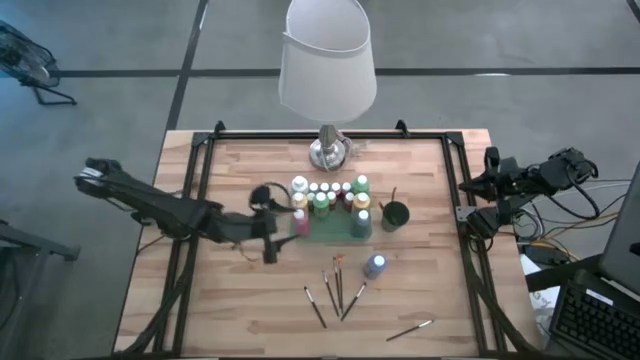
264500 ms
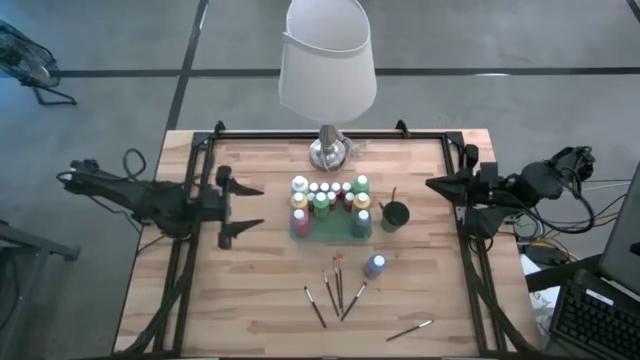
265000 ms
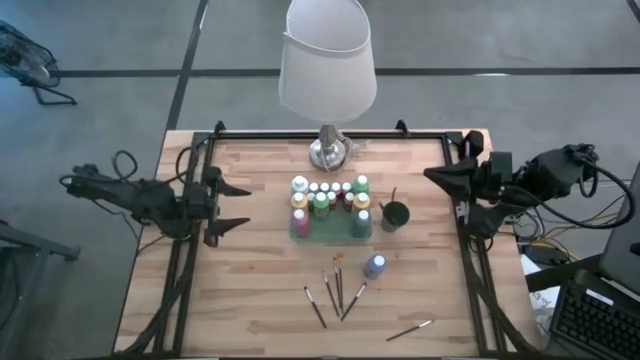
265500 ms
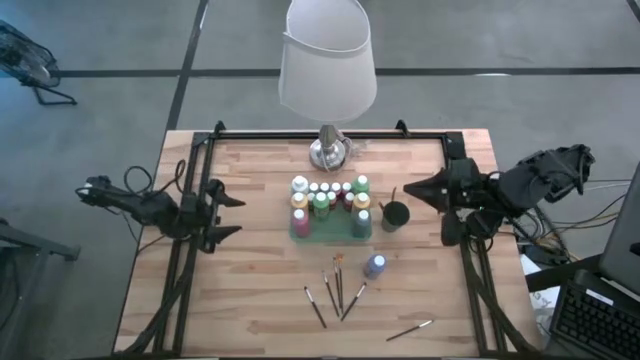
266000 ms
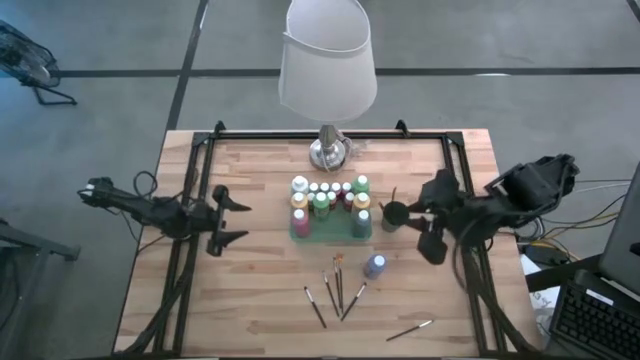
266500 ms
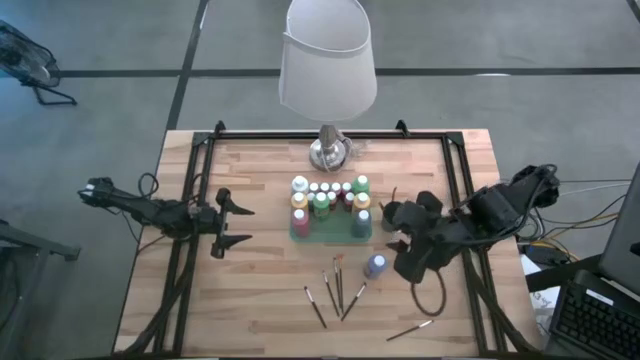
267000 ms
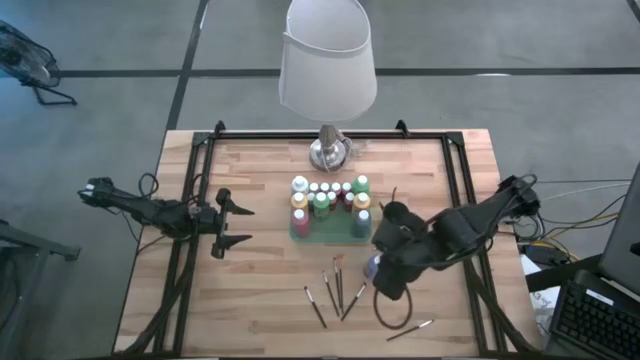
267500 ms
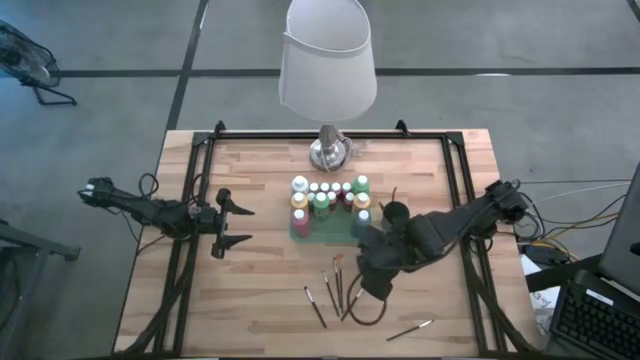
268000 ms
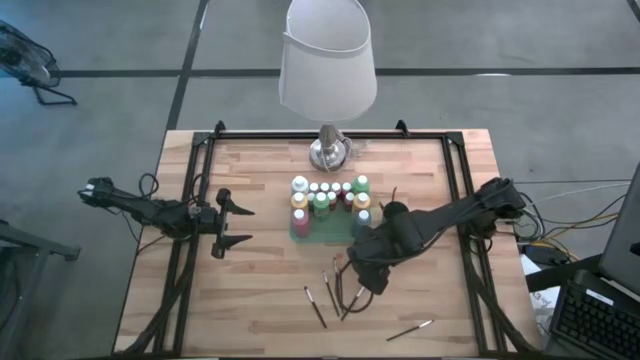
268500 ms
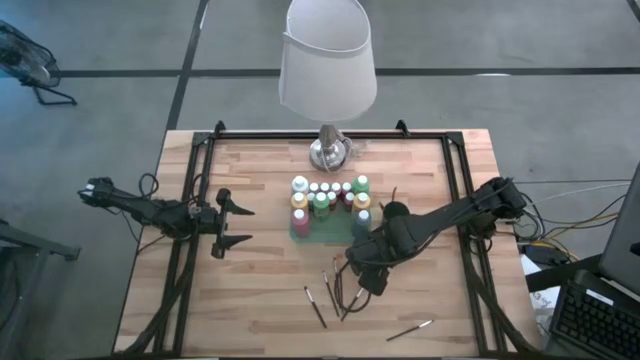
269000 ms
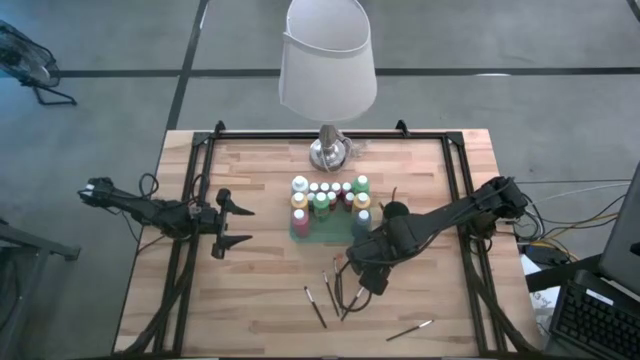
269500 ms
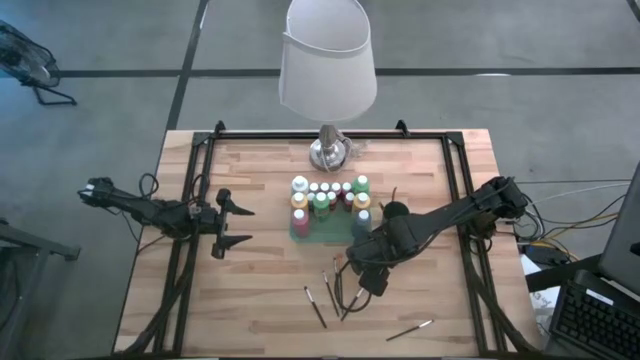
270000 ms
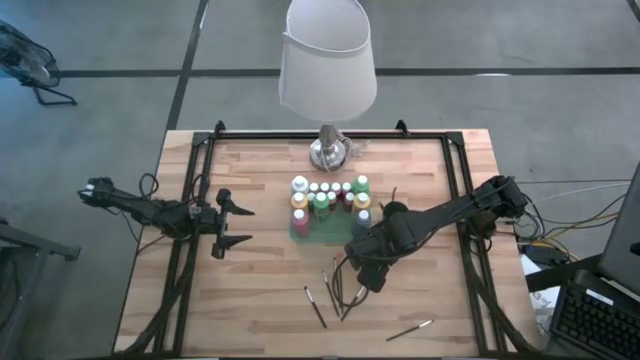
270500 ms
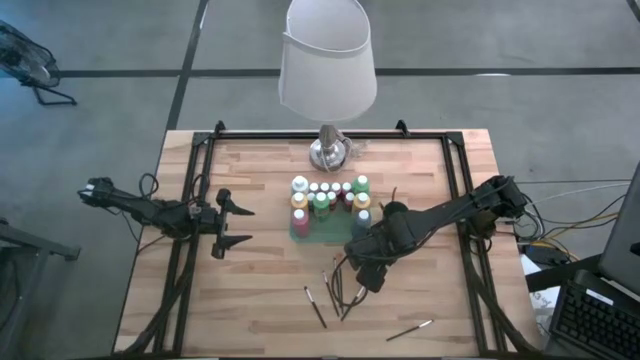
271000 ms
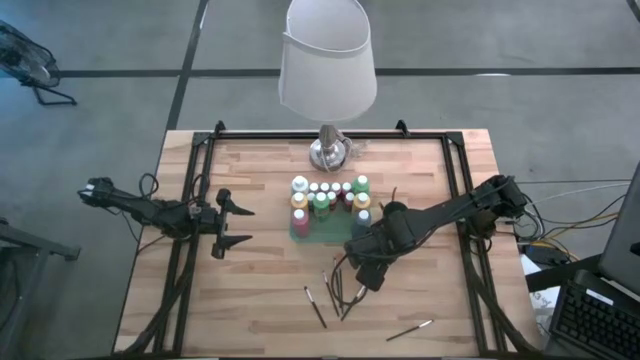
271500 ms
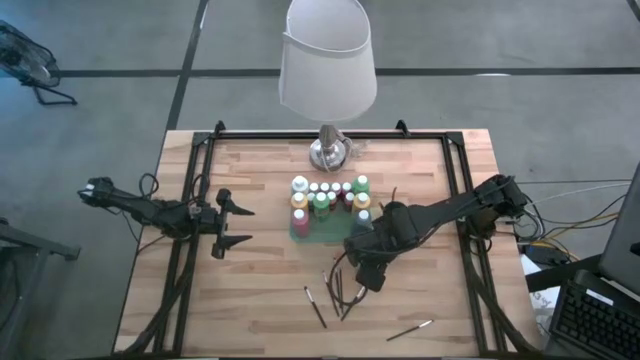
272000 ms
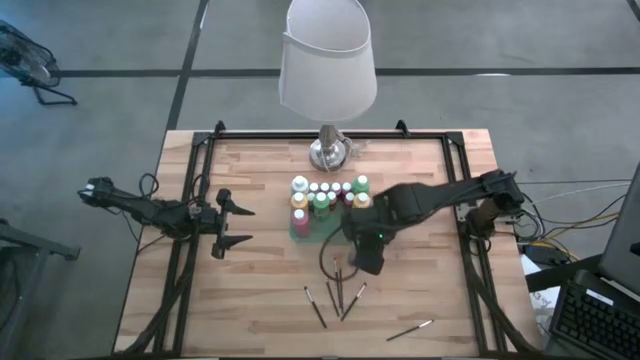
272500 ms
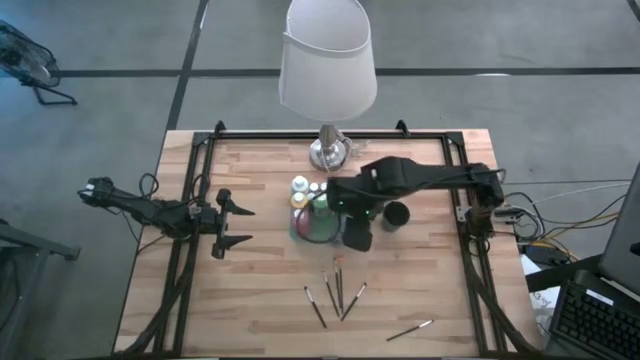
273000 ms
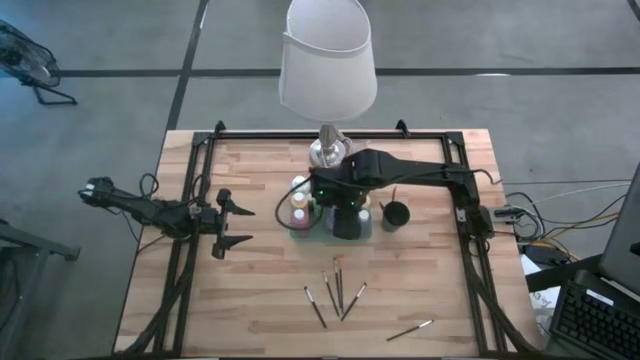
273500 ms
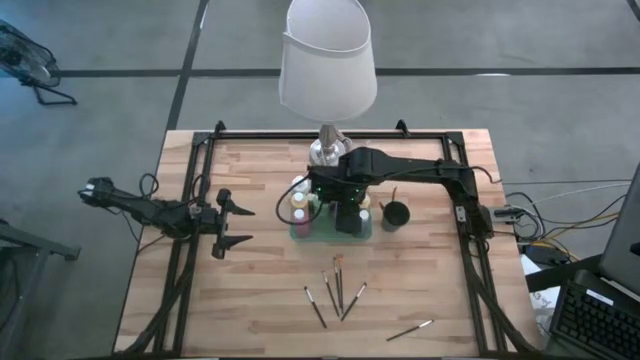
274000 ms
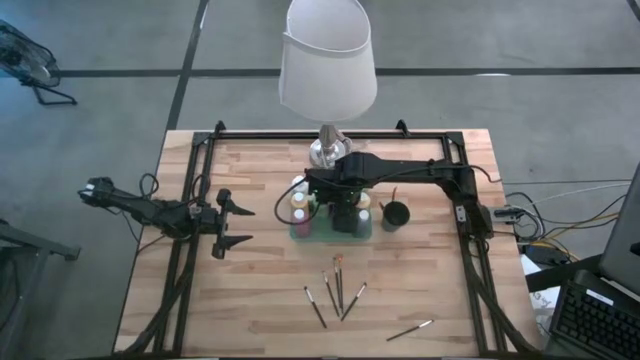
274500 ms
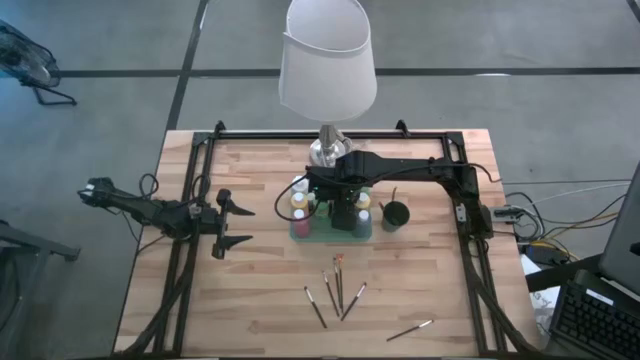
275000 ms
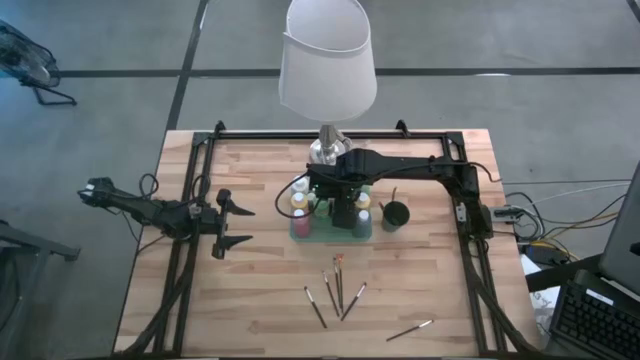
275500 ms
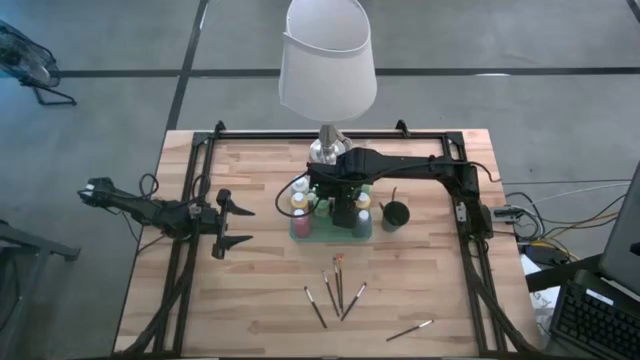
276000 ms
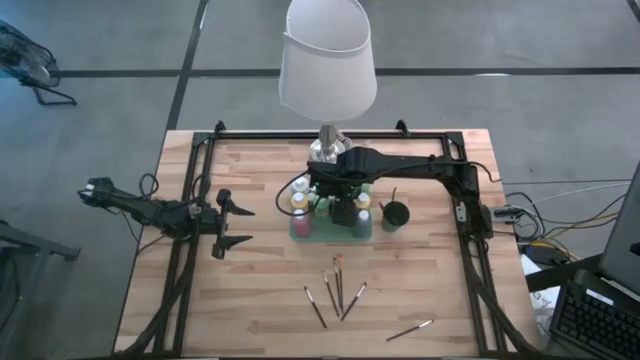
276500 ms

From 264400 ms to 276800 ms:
Task: Pick & Place Paint Supplies
Put the blue paint bottle into the green bin

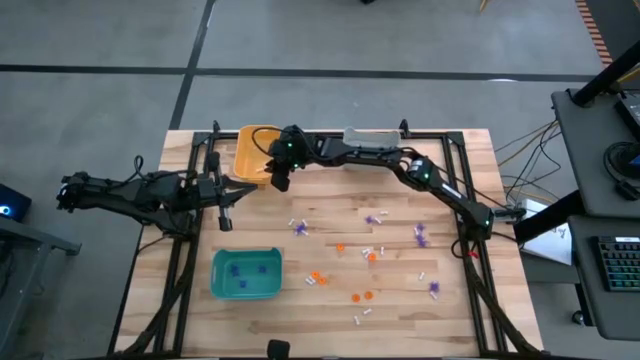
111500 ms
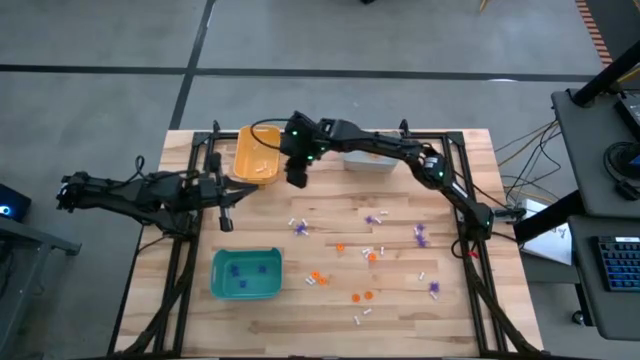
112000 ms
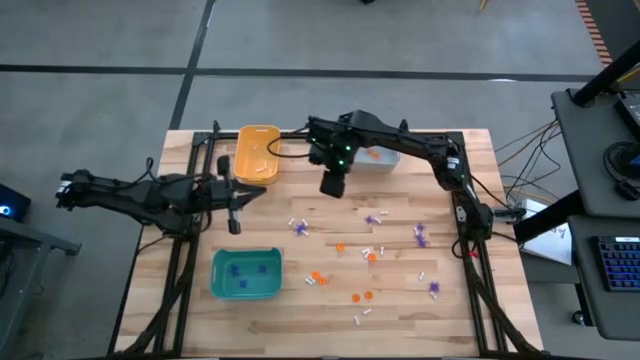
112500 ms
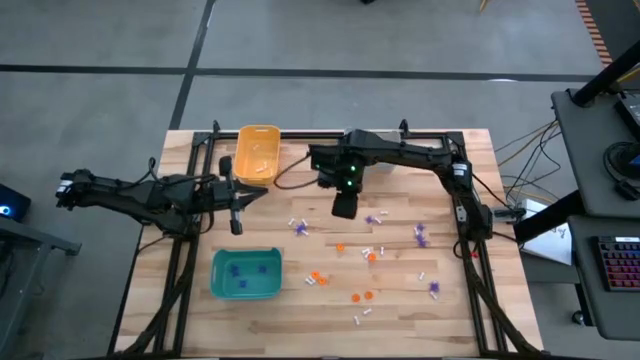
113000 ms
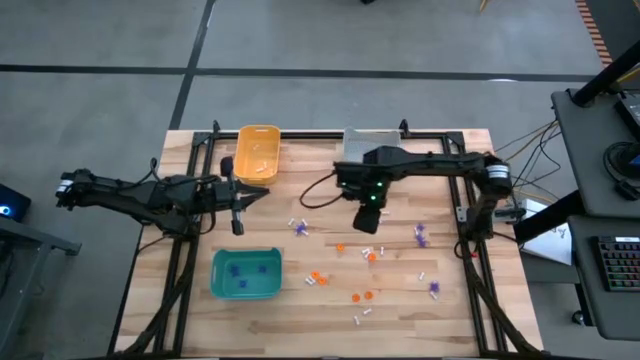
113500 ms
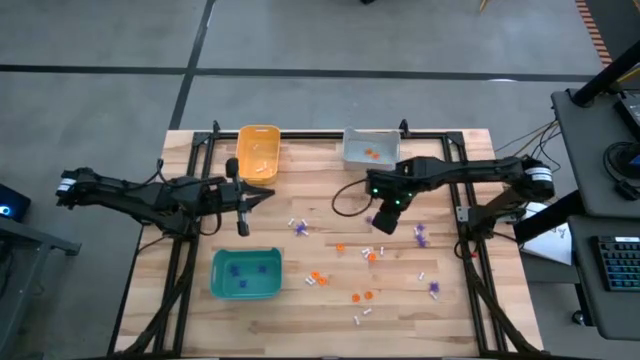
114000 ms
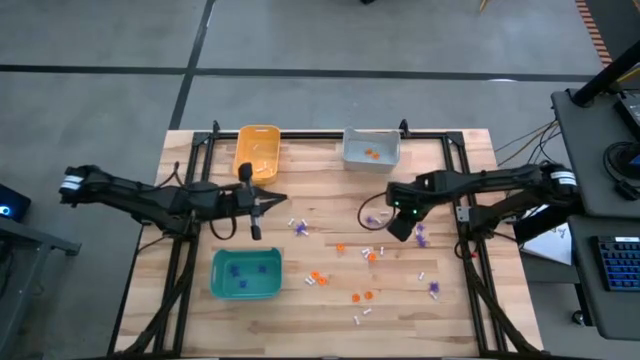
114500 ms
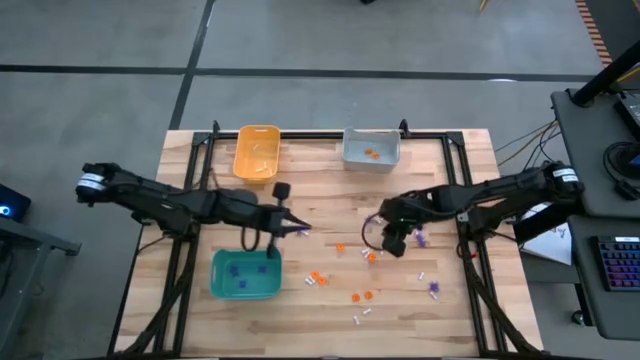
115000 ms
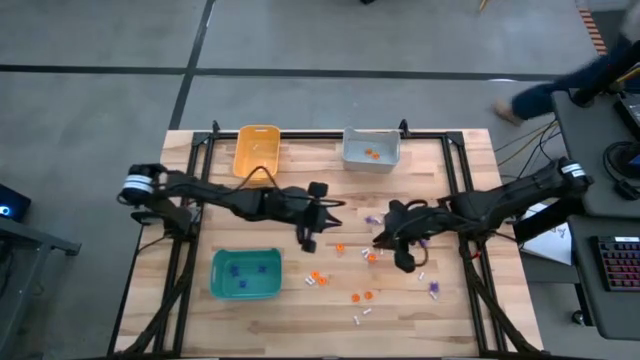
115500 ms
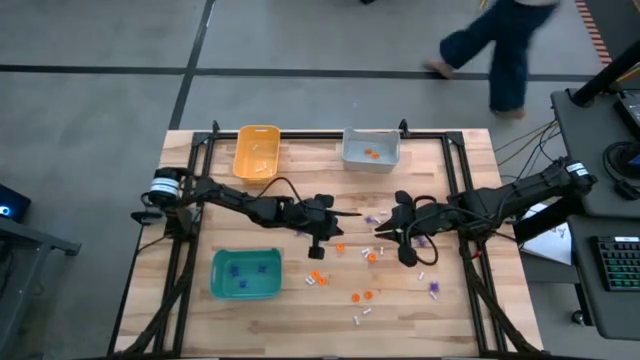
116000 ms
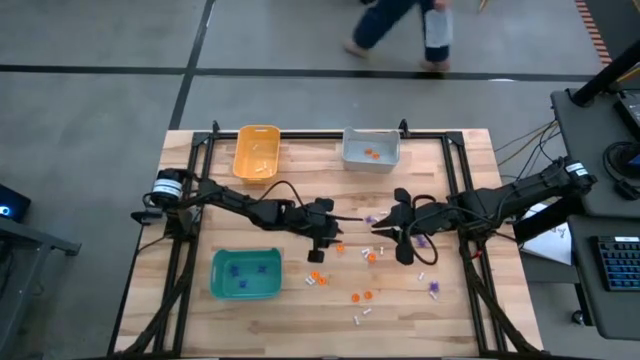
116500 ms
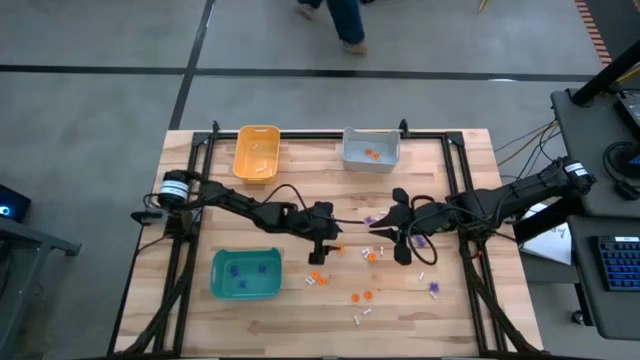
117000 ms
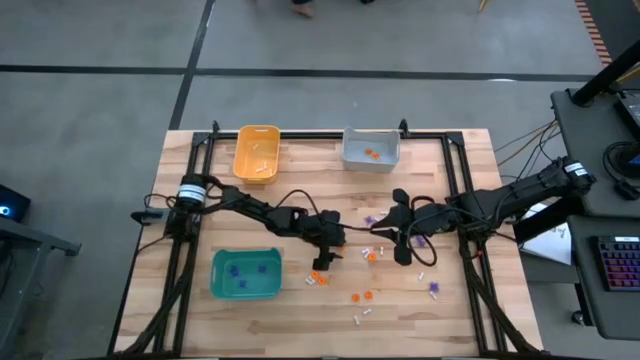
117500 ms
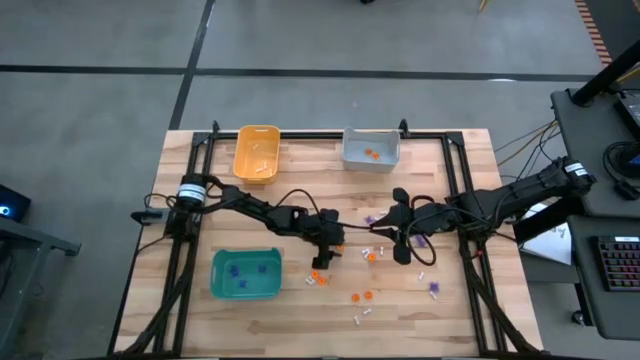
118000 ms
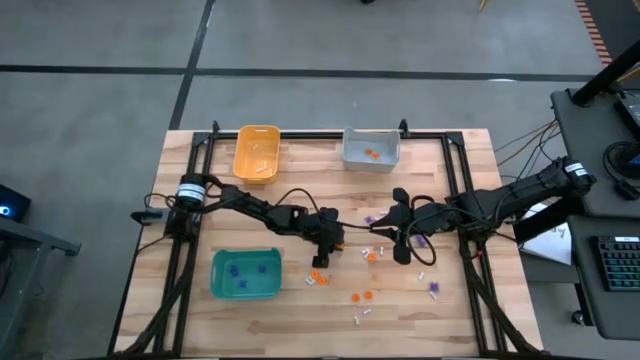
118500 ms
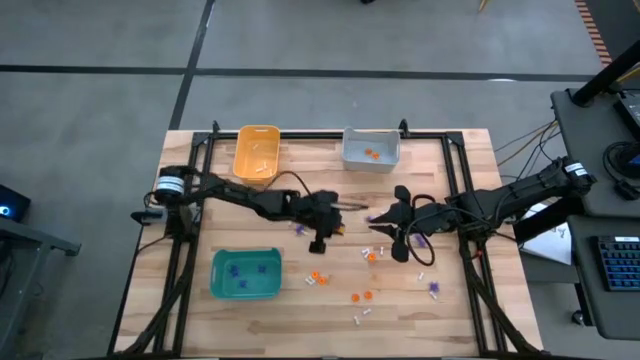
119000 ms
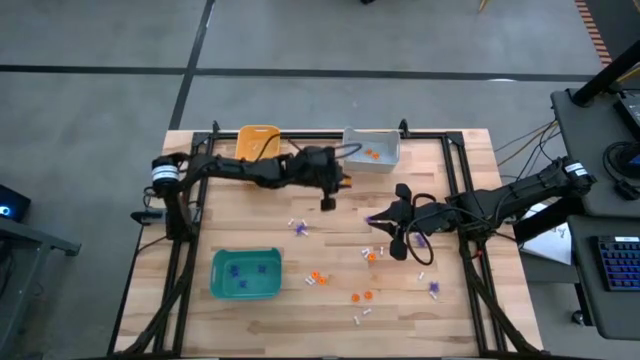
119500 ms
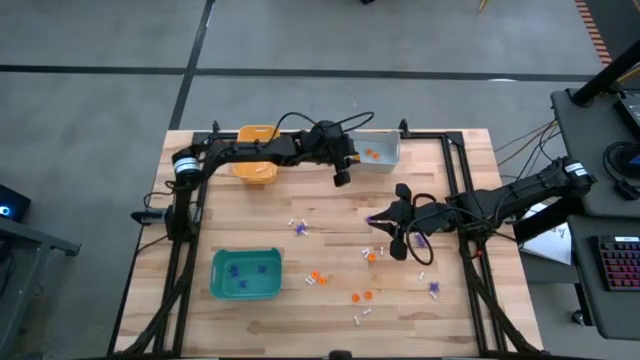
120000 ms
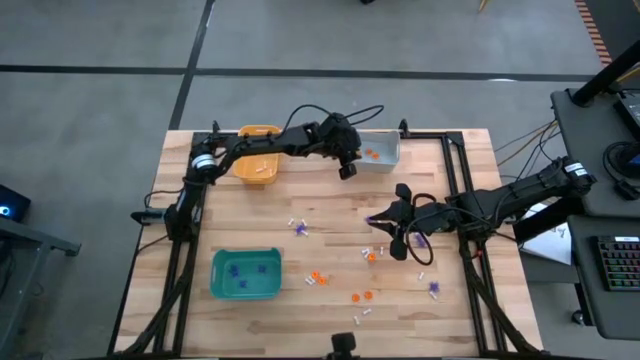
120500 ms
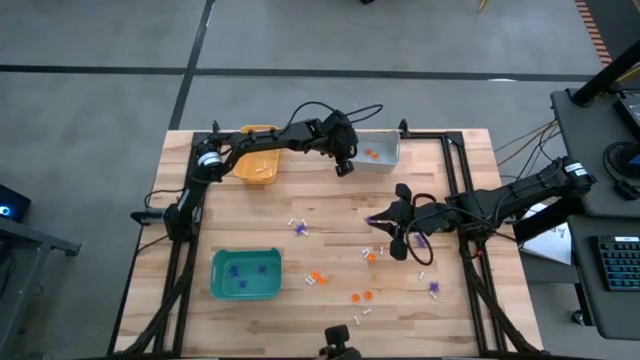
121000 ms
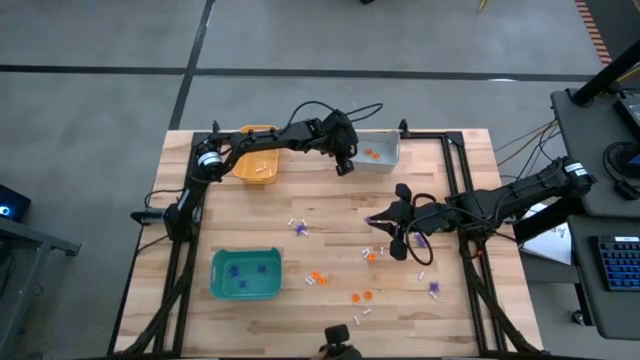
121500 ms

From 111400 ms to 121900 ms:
Task: Sort Halloween decoration
Put the orange pumpkin toy into the gray bin
